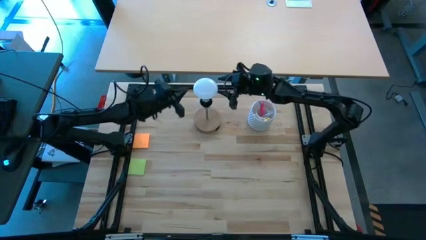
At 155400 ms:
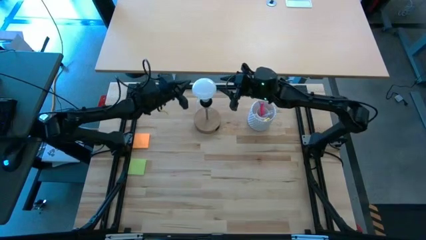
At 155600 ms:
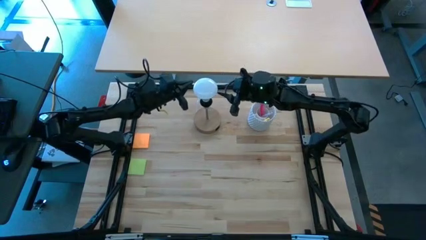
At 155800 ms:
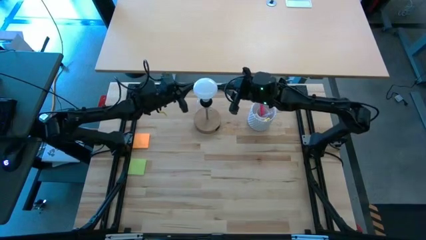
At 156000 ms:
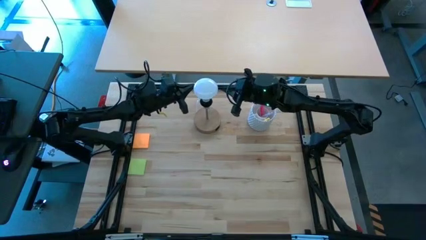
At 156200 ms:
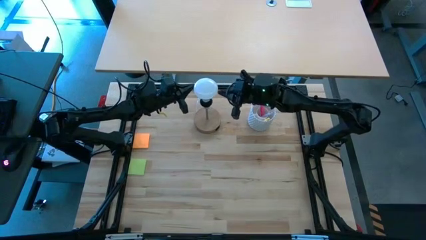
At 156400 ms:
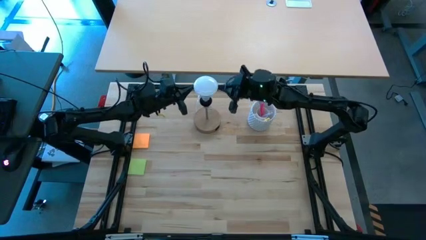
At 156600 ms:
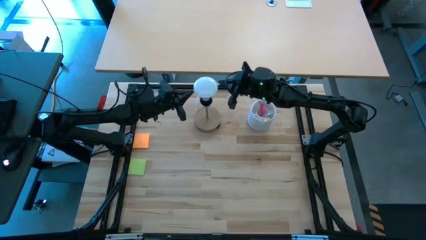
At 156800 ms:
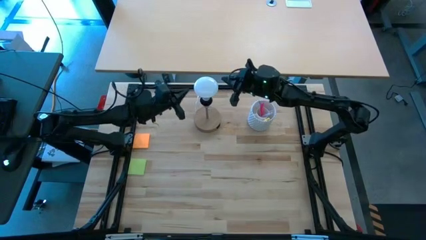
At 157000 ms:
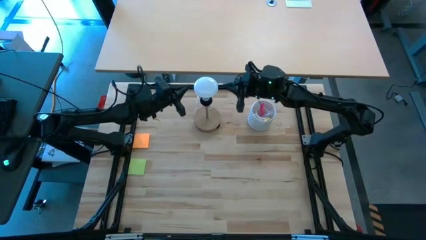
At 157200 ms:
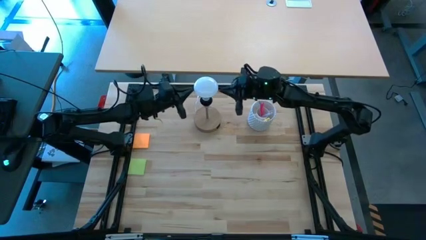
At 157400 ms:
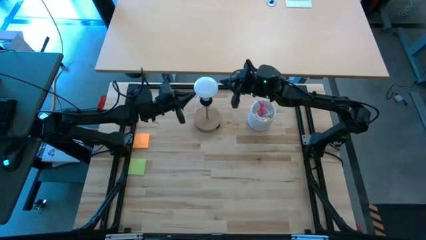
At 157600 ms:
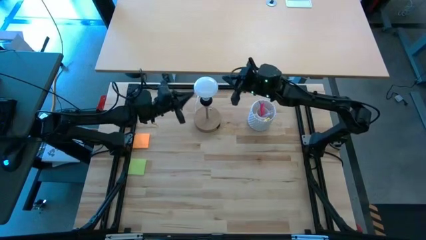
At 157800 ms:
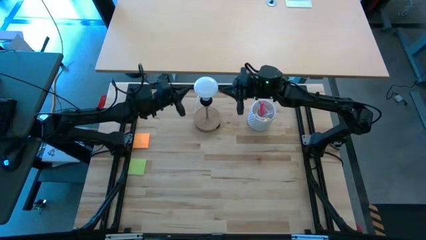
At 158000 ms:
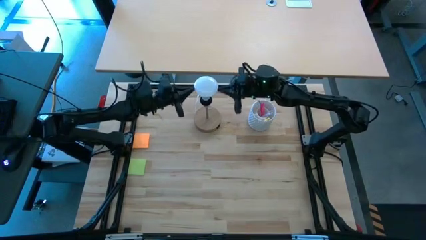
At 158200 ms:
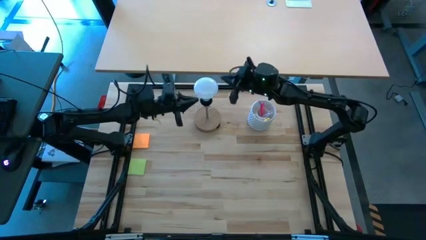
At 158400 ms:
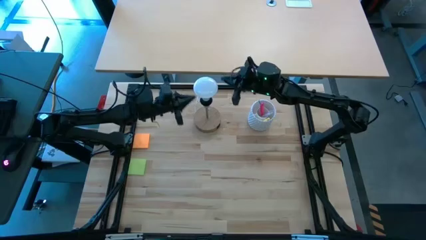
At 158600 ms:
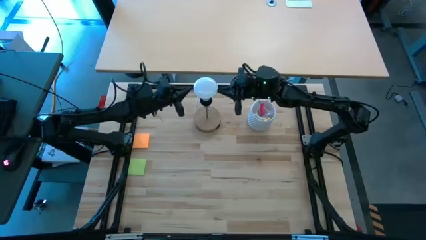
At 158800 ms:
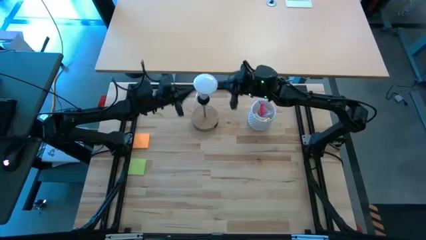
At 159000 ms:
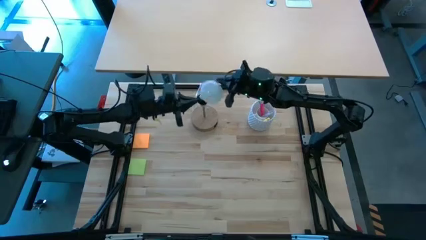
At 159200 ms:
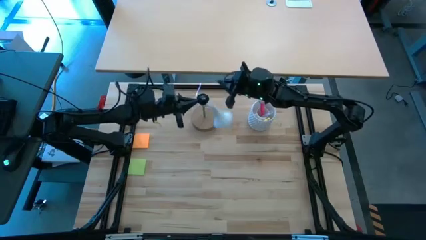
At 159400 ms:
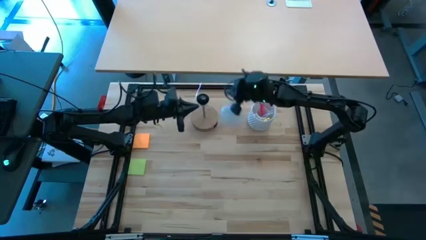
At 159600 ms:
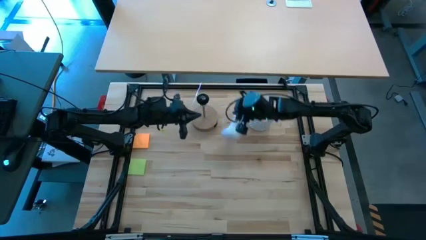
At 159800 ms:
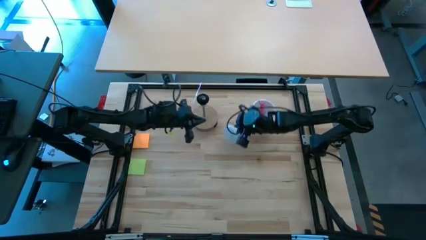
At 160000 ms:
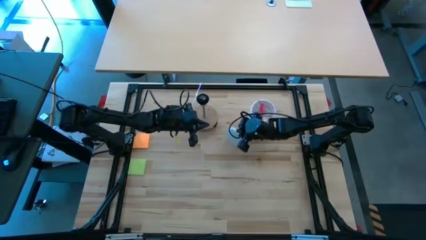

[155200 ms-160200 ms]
Task: Screw lightbulb
Remove the lightbulb from the brown lamp

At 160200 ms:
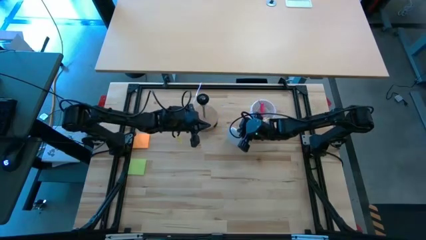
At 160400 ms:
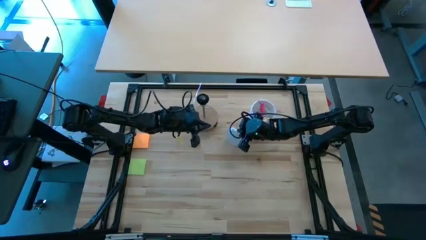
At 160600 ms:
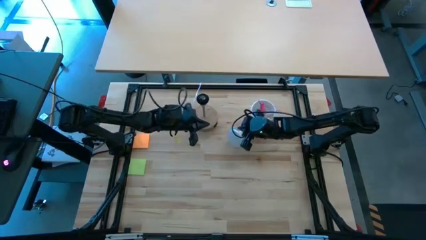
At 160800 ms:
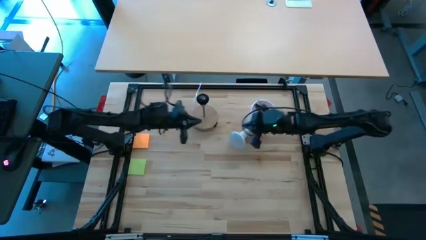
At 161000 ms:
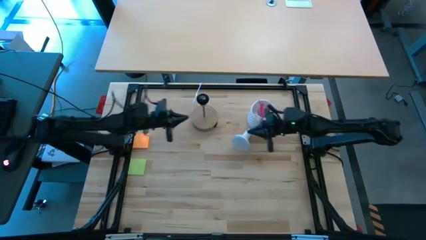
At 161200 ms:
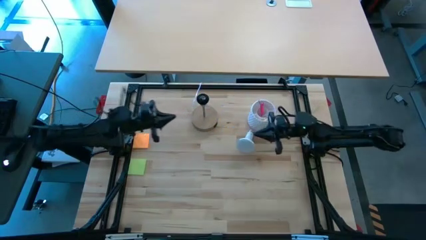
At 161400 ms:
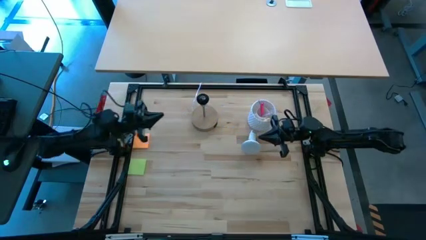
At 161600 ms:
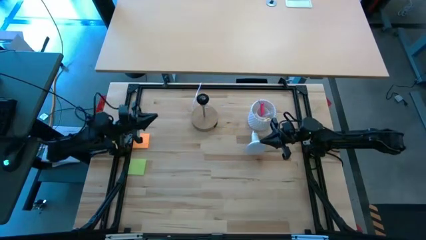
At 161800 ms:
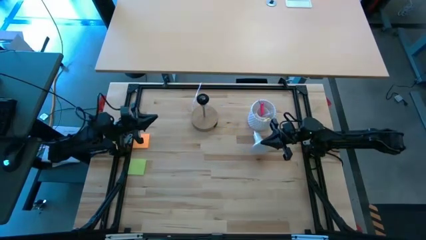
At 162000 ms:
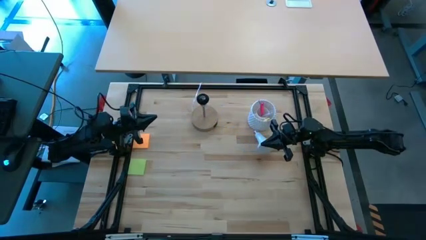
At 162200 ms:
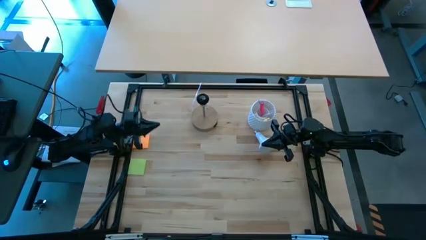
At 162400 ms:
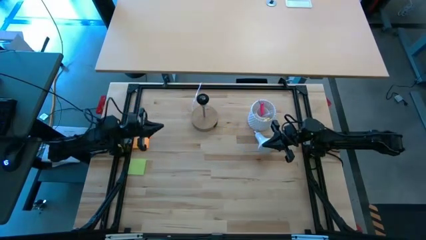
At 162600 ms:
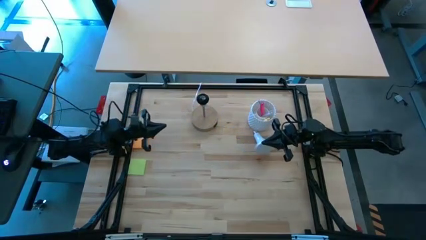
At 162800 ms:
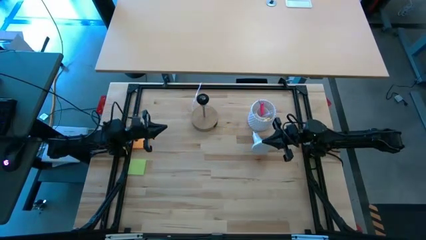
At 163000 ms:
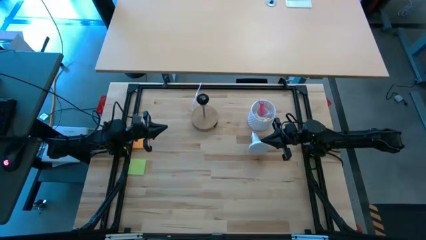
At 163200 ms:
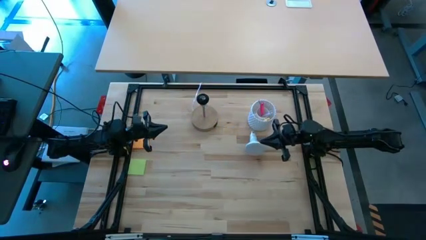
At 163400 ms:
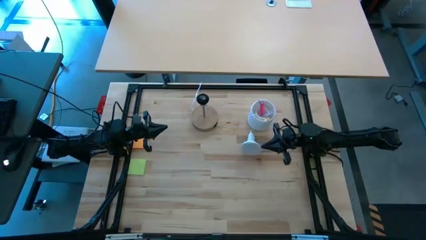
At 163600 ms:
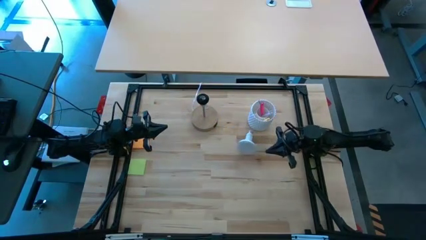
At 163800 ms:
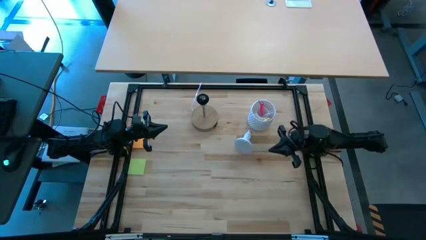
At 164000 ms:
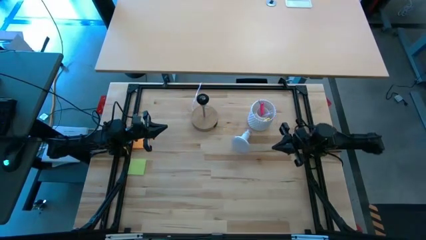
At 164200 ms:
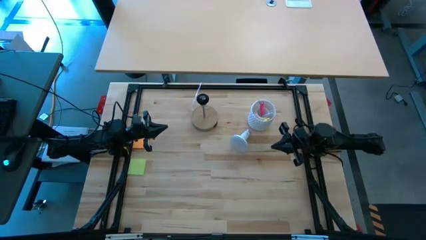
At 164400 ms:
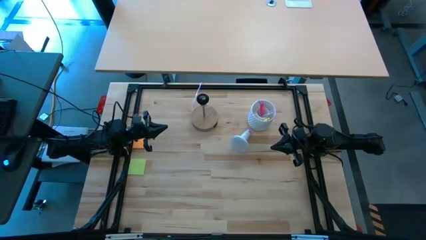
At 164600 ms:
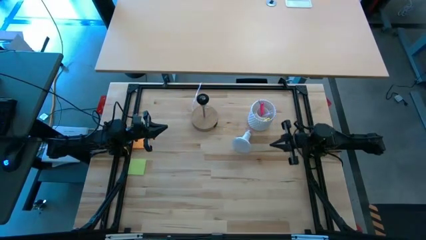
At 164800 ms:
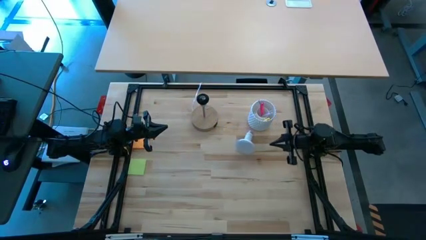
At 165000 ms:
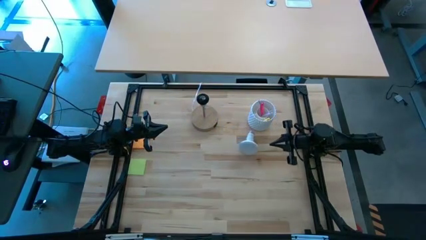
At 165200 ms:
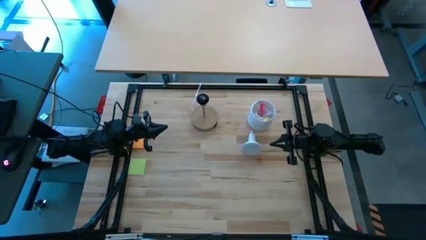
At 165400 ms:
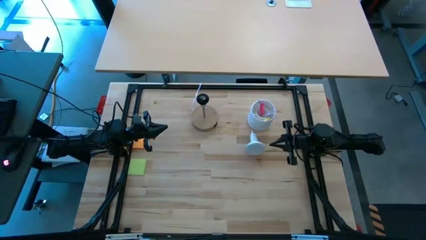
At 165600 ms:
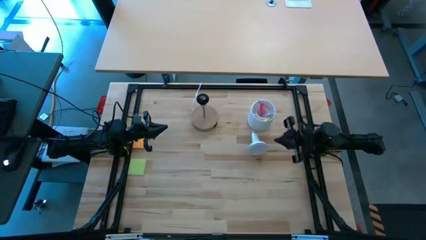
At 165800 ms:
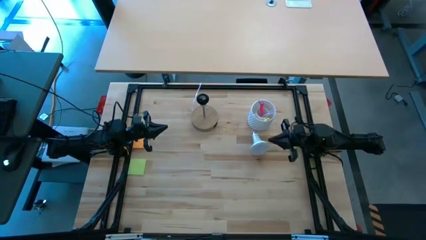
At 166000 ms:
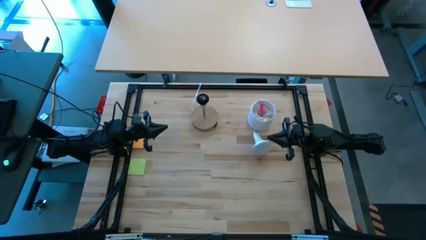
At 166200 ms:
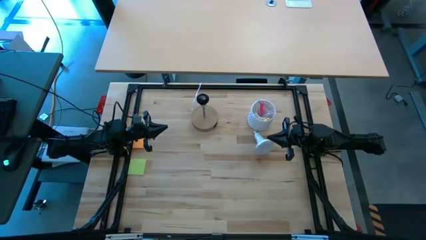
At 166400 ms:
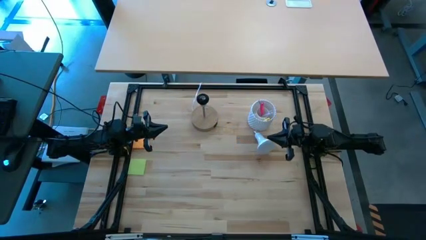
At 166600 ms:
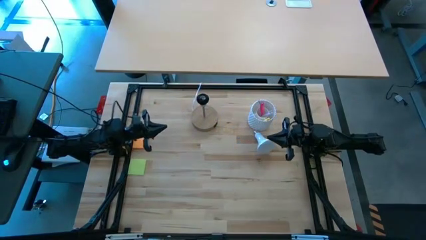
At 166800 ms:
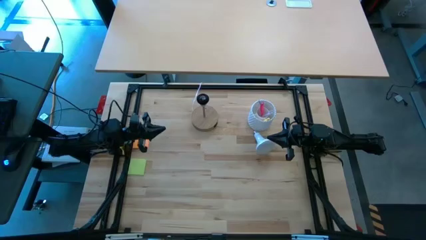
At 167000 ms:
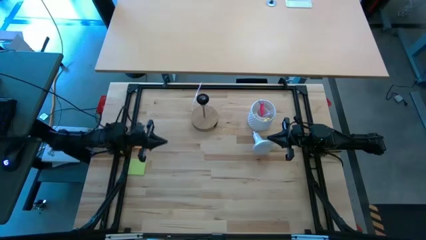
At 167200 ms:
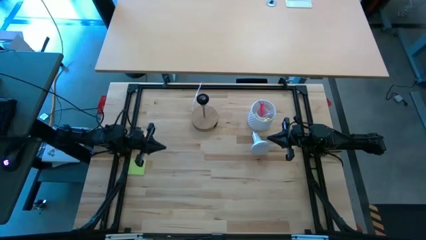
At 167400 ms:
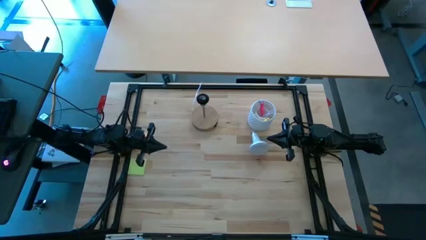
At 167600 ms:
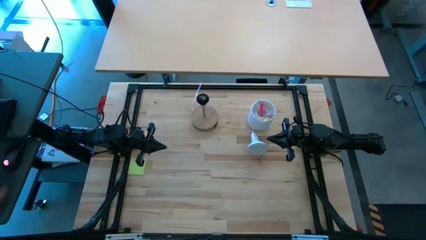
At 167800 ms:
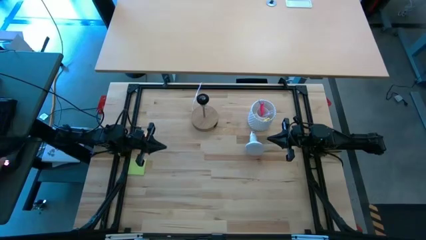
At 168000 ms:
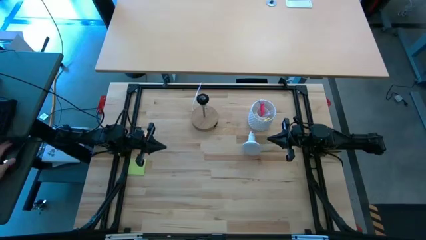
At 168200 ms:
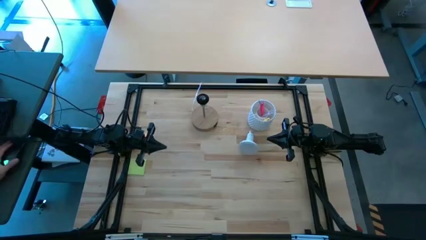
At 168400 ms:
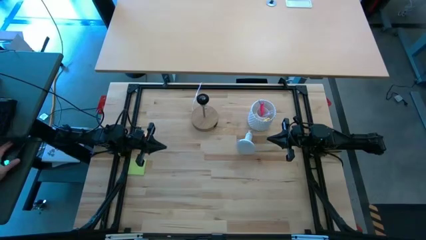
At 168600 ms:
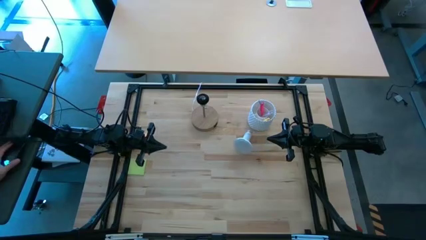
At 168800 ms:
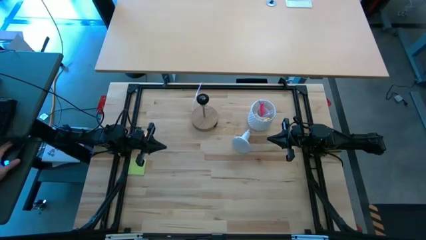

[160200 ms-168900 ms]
Return to Home Position
